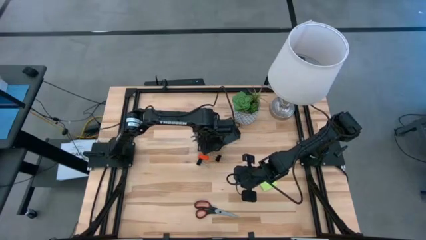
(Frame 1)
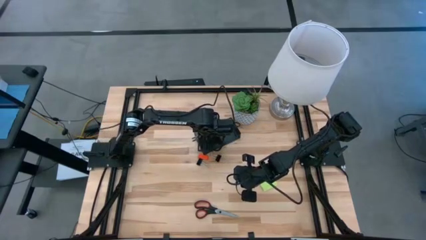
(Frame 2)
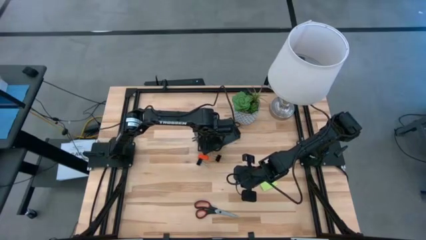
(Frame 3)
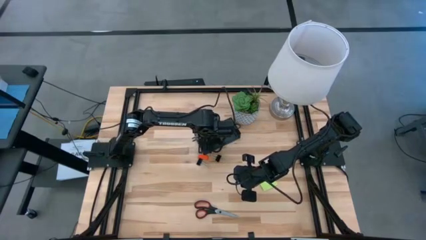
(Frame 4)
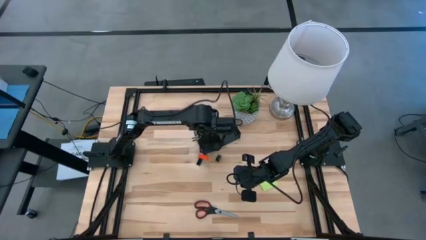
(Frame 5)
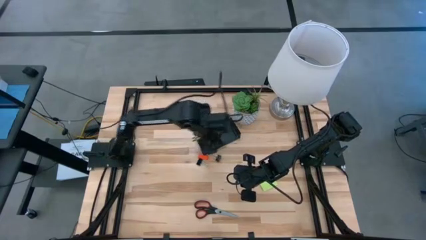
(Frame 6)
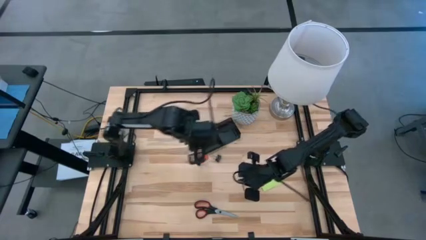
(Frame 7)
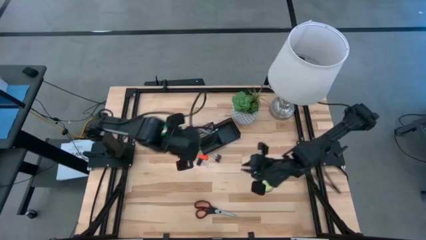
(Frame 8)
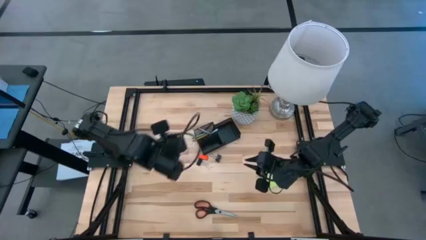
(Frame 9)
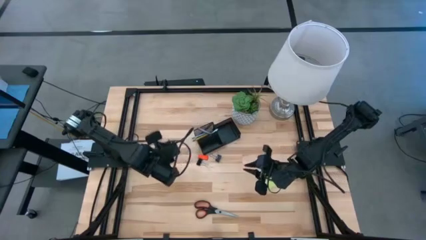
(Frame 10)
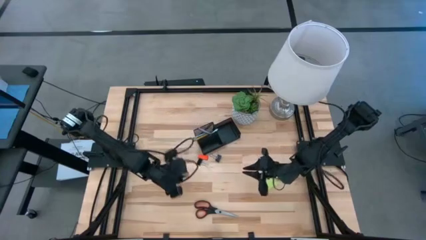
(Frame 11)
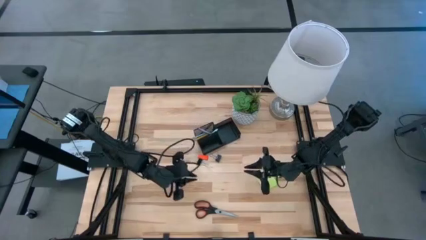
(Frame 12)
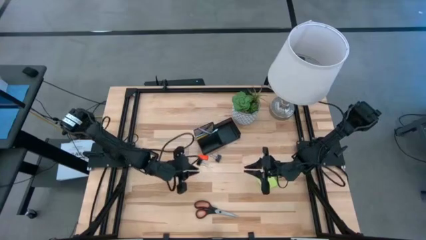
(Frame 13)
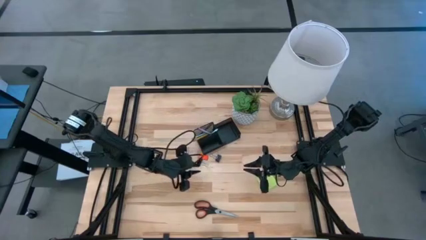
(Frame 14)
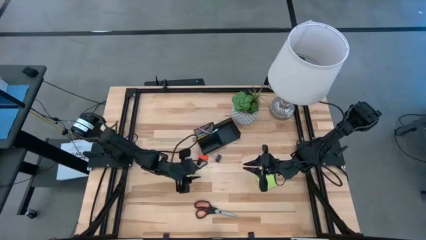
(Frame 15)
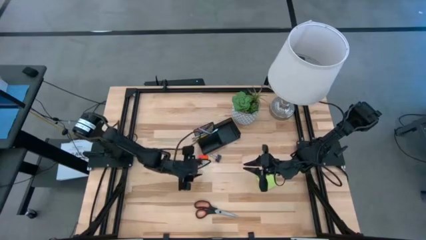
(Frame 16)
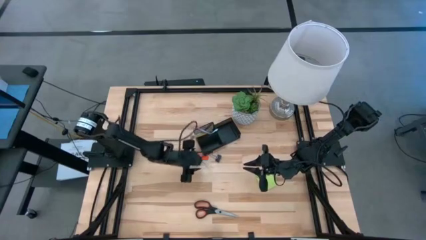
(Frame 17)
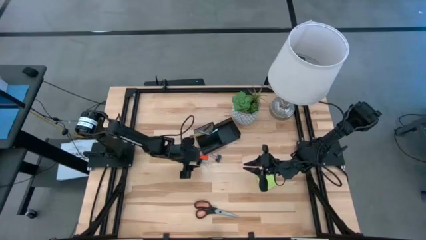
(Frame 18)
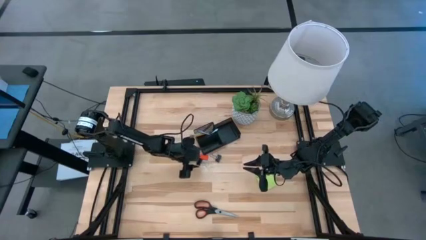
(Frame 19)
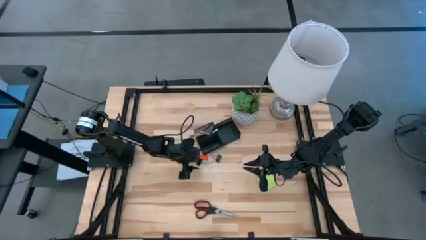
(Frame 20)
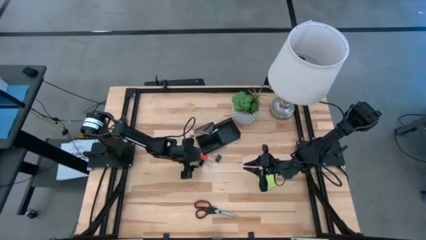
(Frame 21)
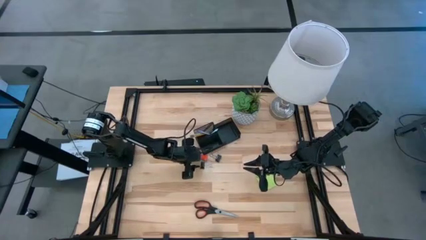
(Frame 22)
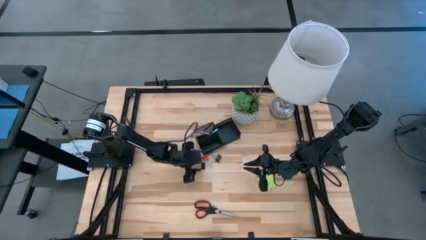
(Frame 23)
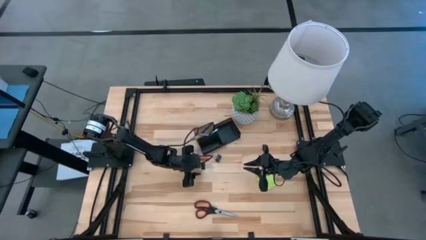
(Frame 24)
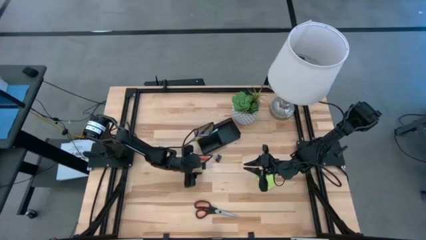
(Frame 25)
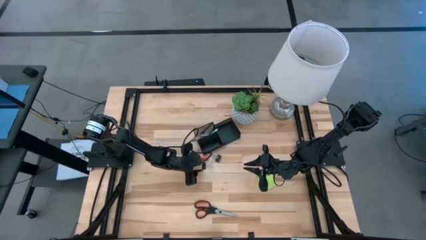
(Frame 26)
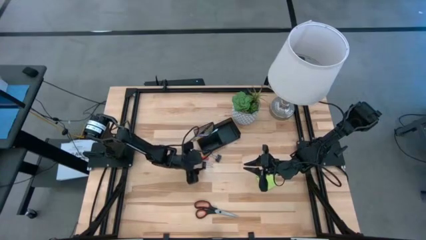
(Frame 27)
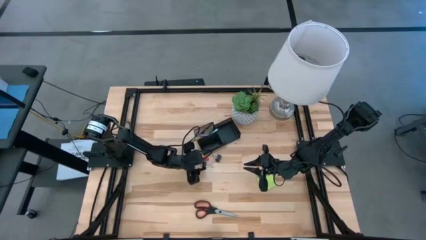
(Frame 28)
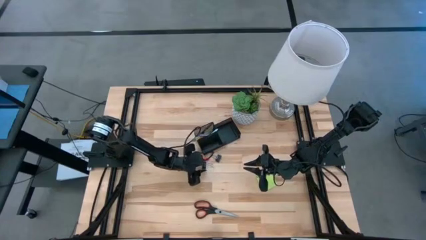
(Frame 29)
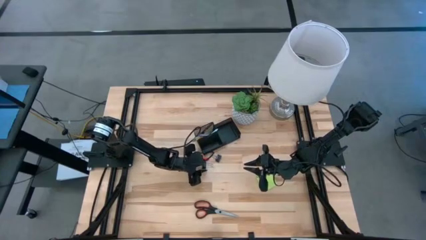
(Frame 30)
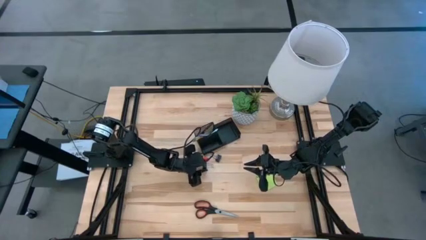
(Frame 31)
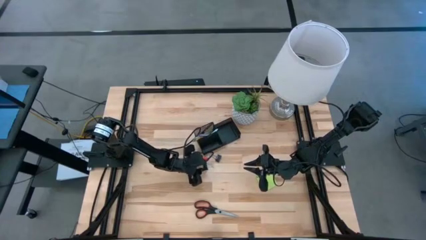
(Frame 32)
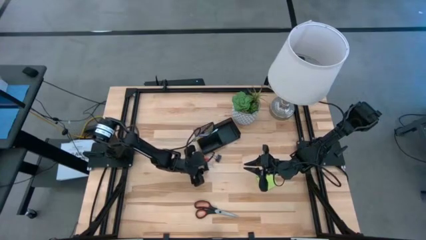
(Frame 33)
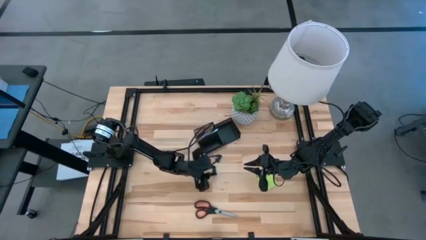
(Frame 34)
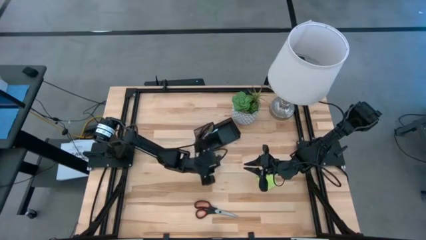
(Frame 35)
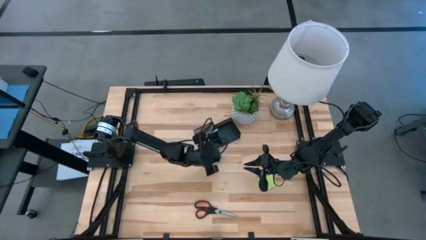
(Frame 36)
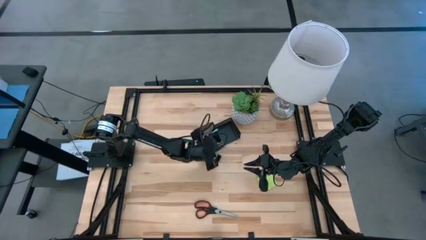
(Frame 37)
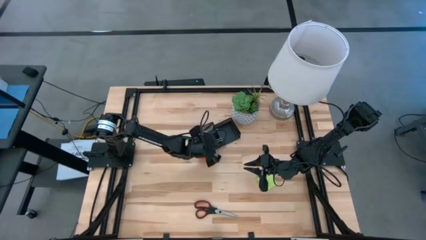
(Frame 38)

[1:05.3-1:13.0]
Task: Pick and place office supplies into organizer
Put the left black binder clip into the black desk organizer

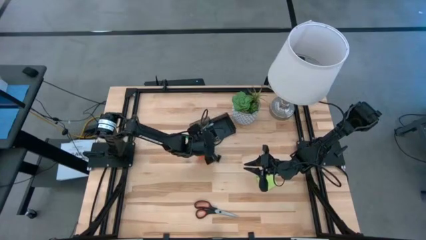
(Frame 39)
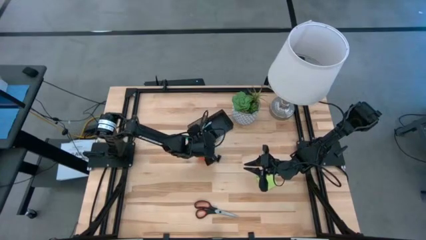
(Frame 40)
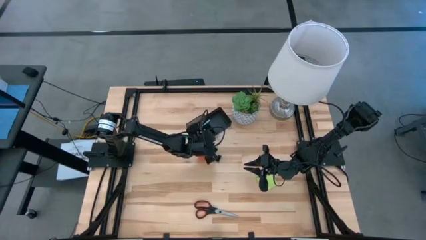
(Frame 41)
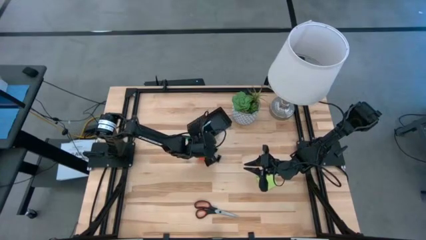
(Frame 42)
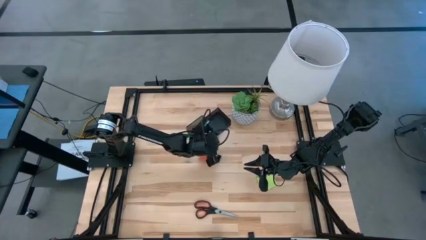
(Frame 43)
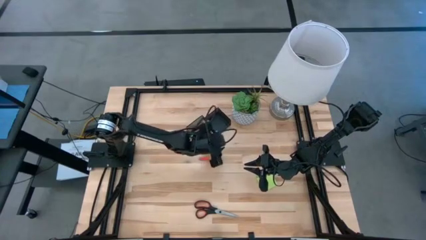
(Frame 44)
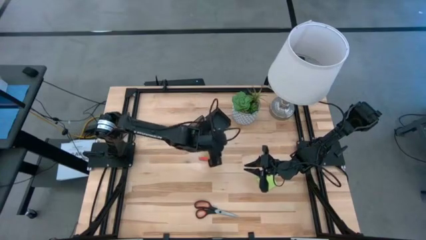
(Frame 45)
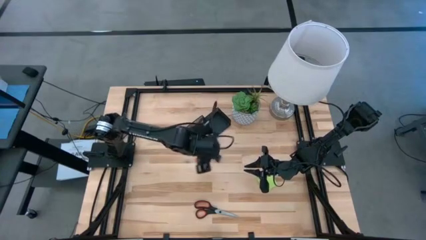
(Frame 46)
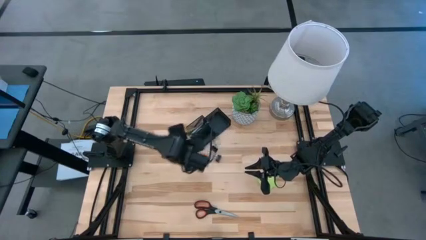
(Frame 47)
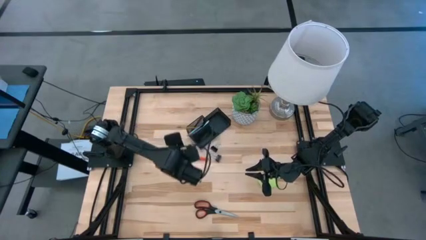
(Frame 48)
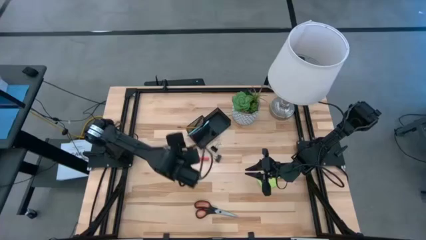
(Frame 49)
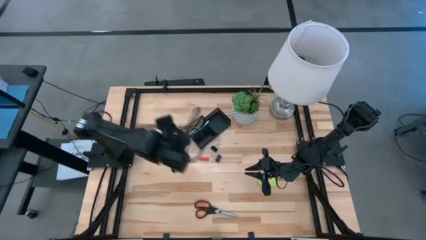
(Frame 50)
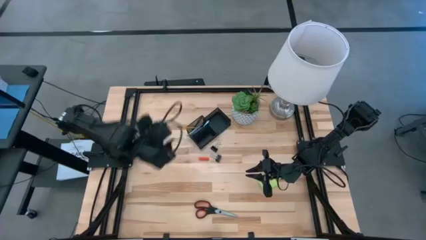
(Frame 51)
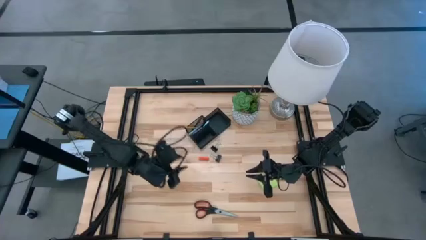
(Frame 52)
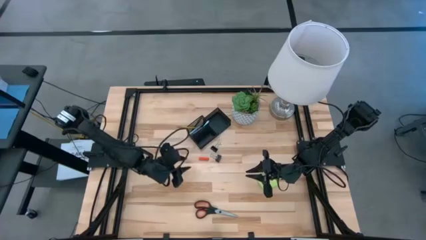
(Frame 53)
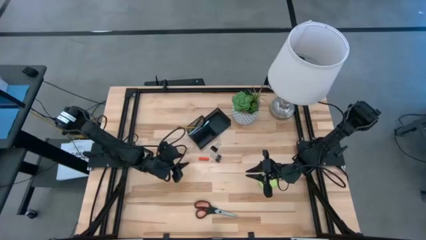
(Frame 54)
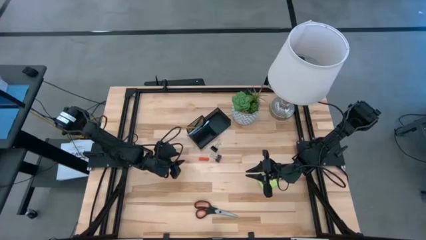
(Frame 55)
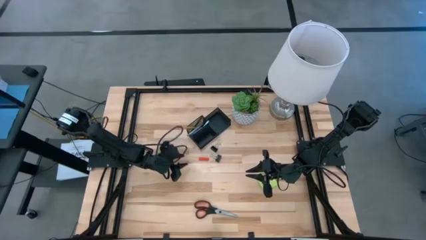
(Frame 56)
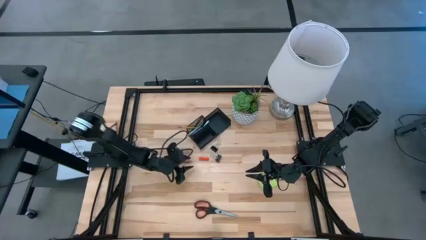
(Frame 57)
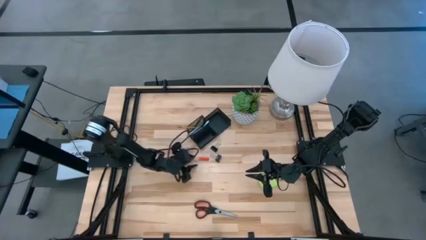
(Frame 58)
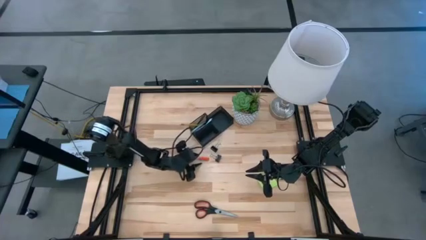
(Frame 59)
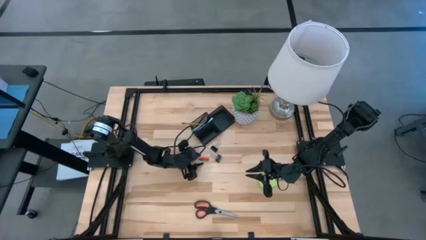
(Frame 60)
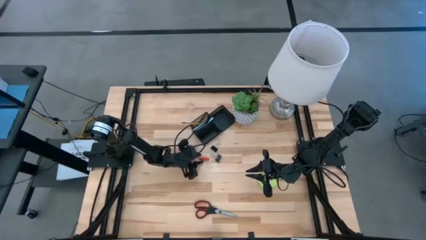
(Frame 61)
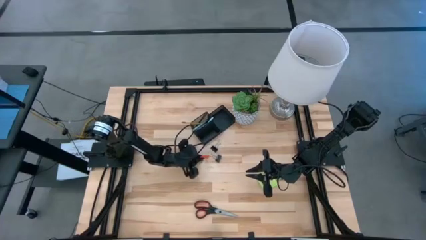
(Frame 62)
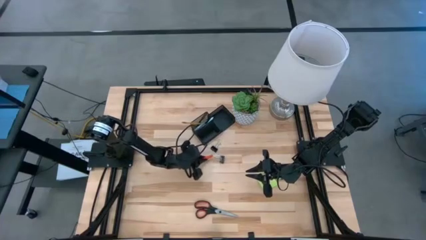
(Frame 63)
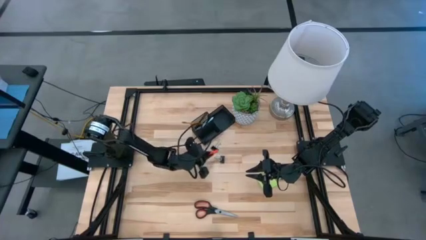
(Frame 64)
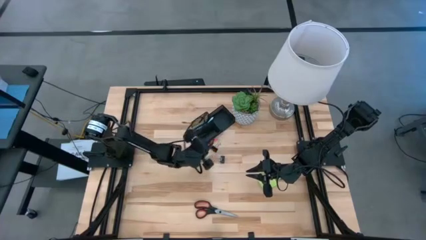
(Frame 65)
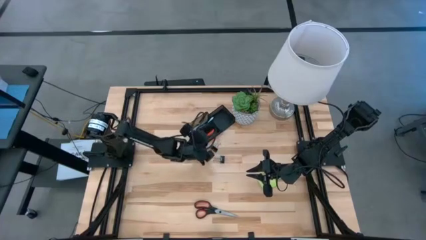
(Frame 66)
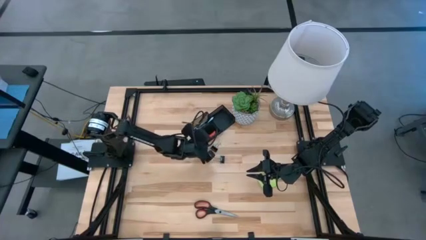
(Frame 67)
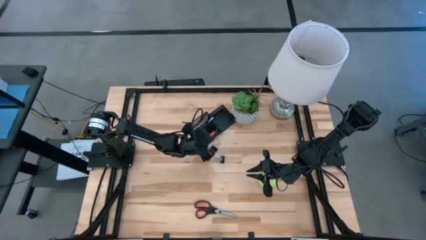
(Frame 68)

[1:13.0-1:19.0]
Put the orange eraser into the black desk organizer

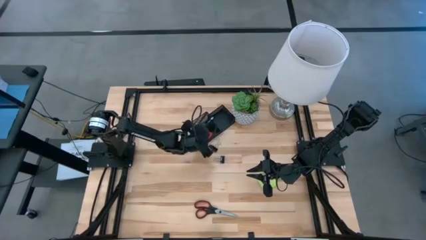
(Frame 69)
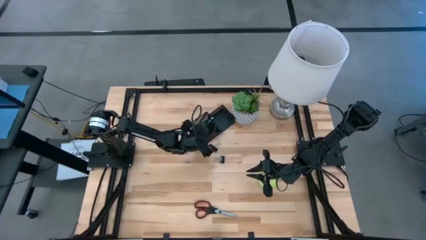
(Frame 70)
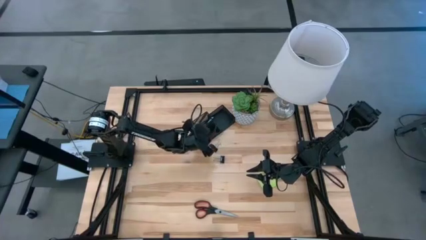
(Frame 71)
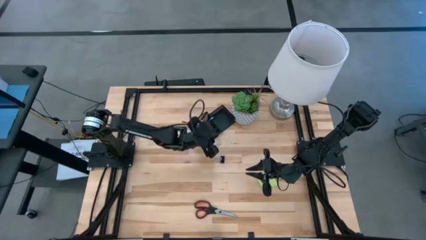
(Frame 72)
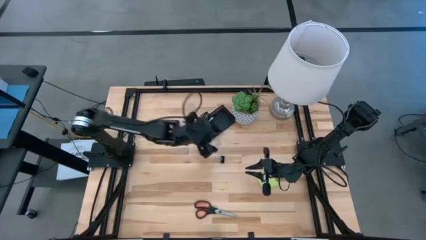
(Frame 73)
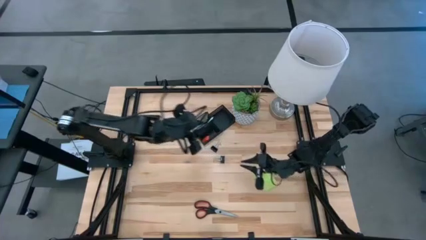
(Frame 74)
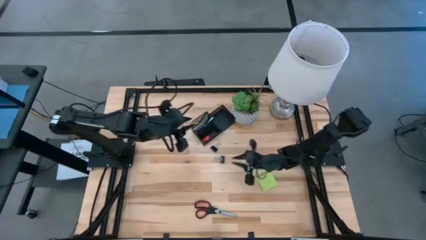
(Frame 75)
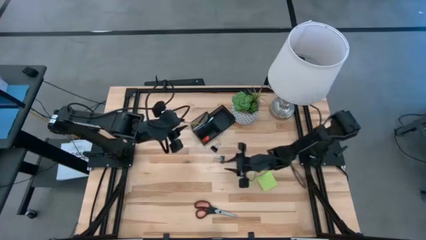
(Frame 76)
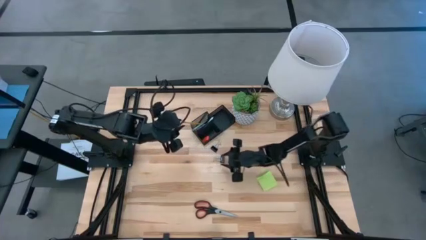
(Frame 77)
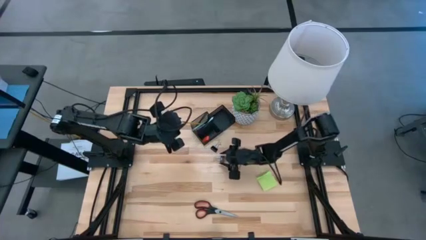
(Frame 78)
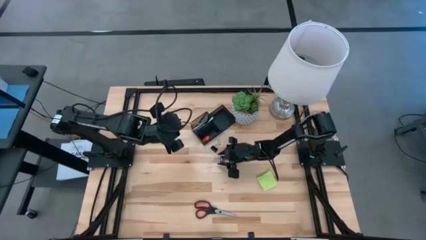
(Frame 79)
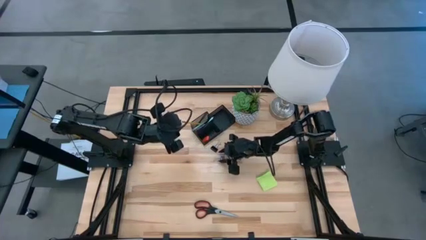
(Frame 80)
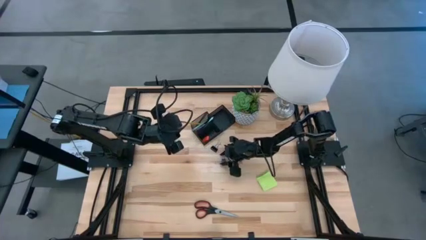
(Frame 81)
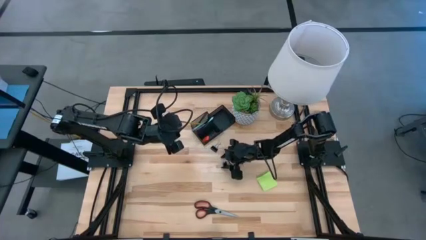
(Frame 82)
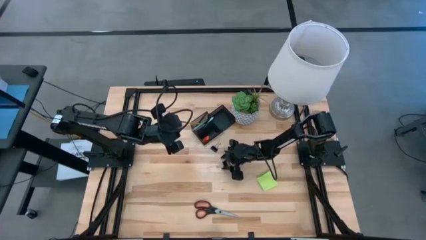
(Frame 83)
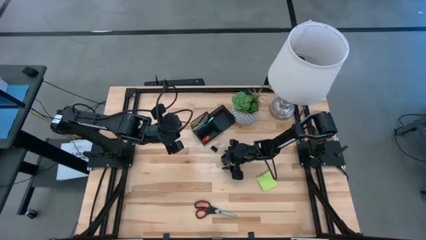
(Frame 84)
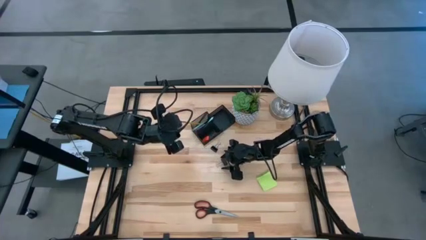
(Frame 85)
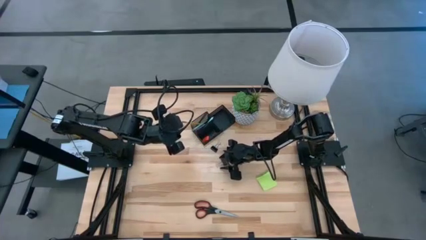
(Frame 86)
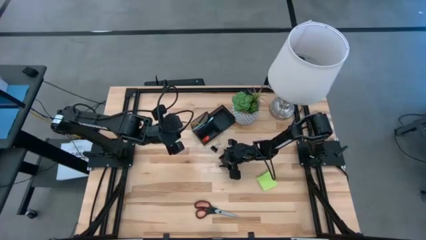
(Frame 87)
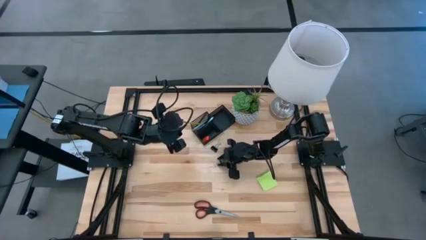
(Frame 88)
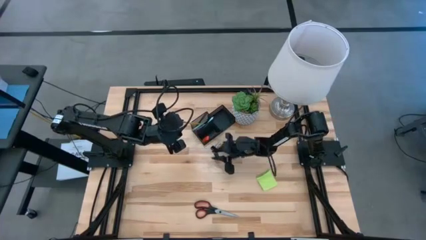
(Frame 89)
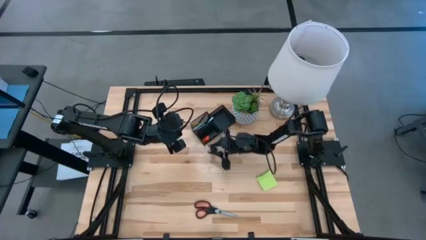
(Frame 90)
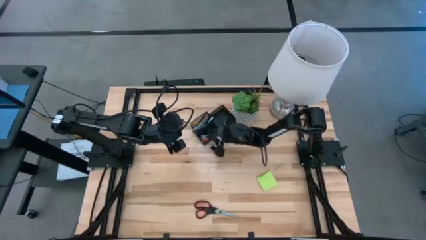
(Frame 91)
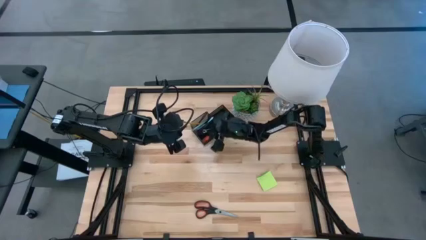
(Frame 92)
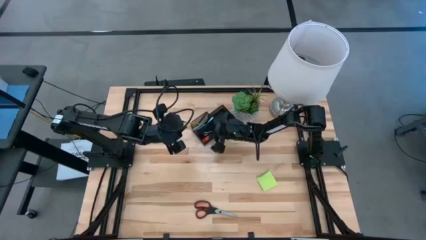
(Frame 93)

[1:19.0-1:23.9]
Put the bottom black binder clip into the black desk organizer
